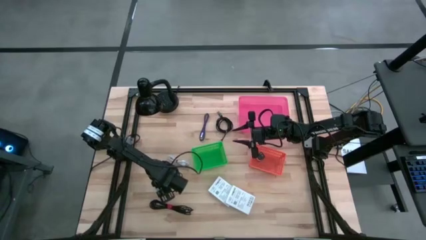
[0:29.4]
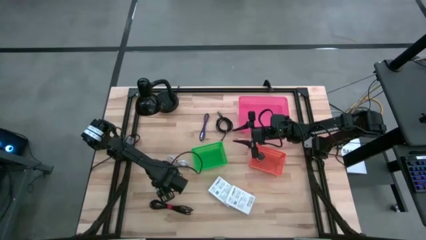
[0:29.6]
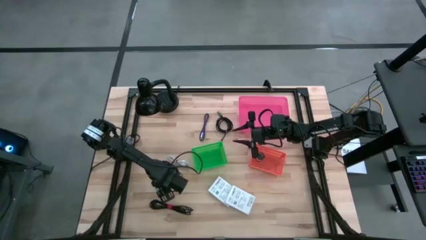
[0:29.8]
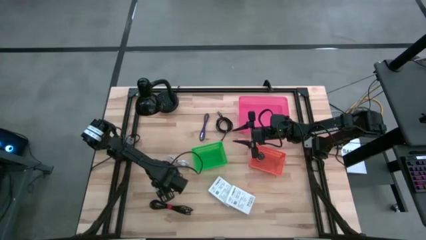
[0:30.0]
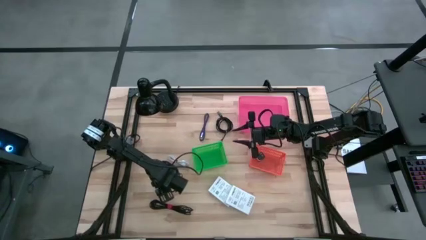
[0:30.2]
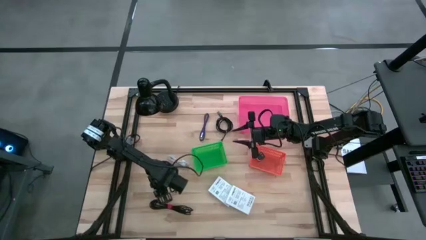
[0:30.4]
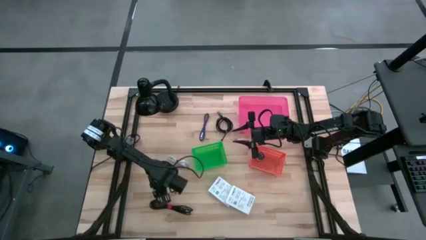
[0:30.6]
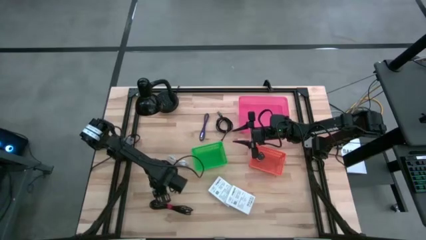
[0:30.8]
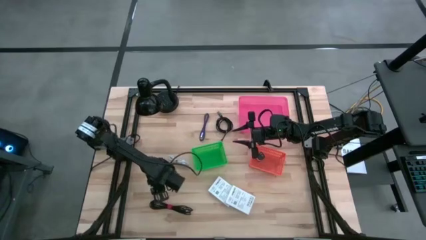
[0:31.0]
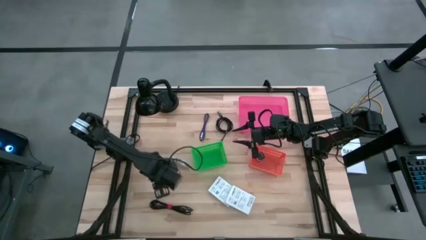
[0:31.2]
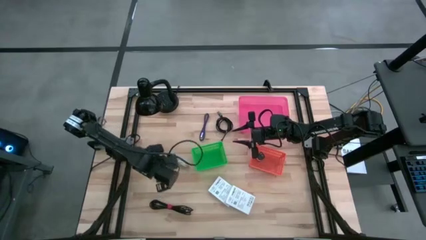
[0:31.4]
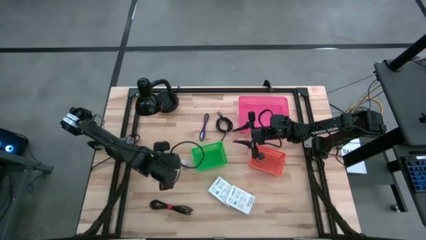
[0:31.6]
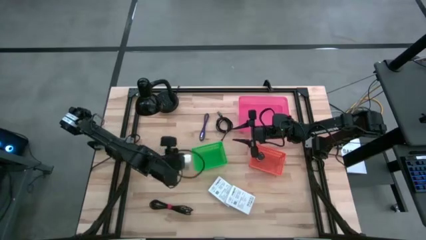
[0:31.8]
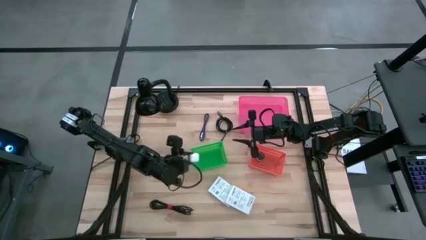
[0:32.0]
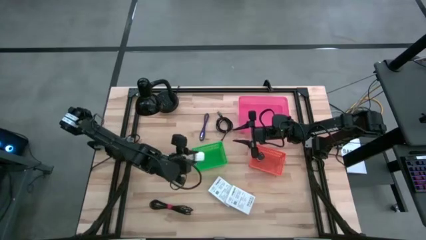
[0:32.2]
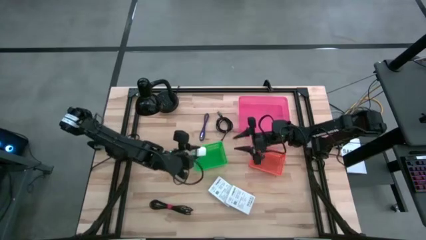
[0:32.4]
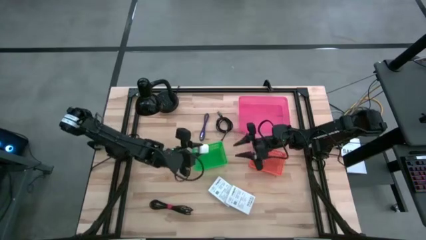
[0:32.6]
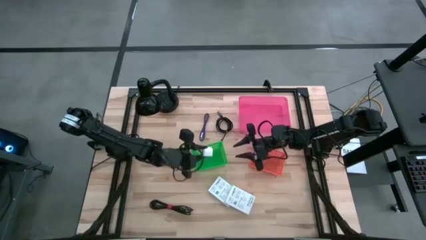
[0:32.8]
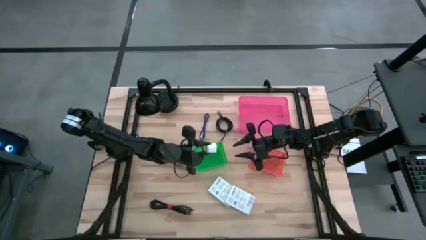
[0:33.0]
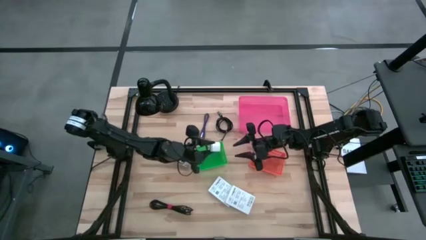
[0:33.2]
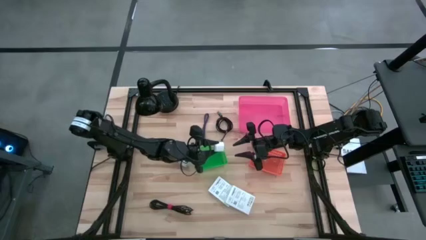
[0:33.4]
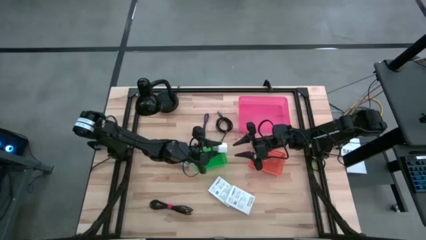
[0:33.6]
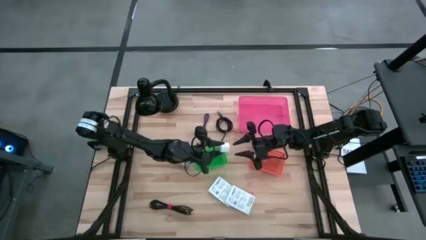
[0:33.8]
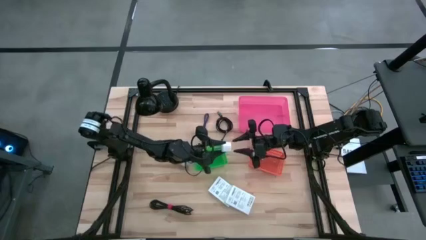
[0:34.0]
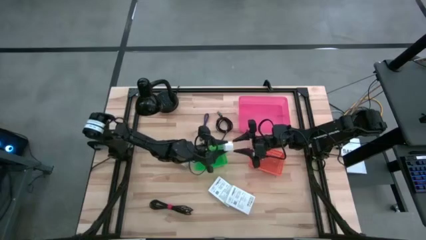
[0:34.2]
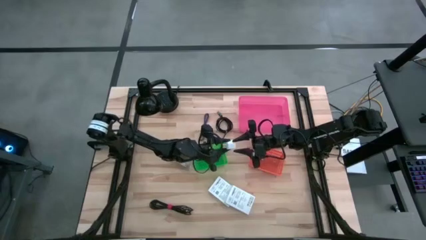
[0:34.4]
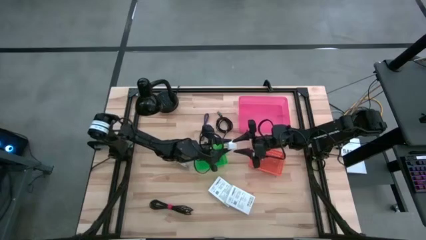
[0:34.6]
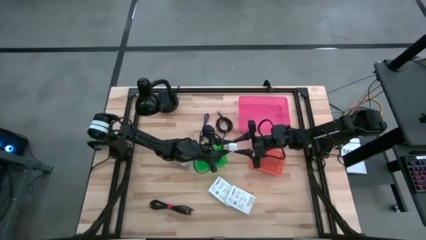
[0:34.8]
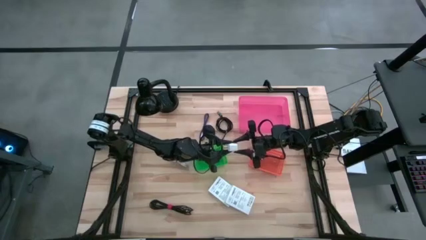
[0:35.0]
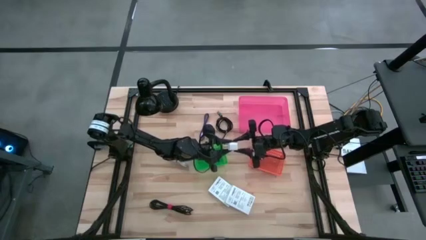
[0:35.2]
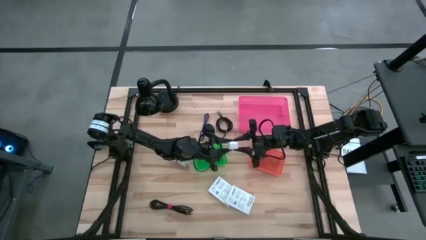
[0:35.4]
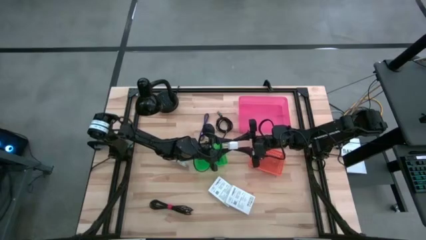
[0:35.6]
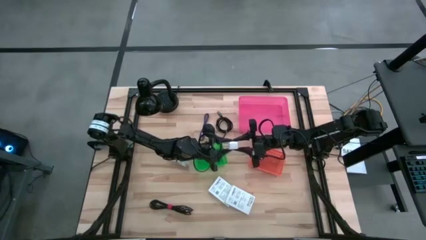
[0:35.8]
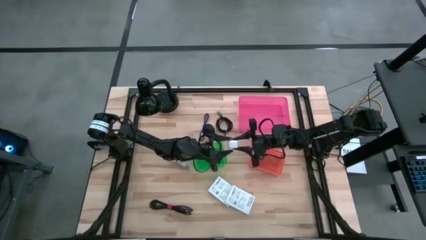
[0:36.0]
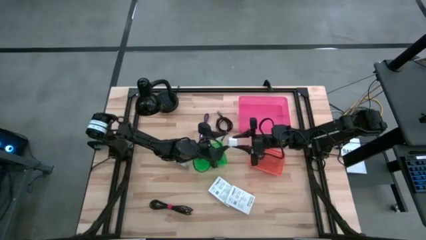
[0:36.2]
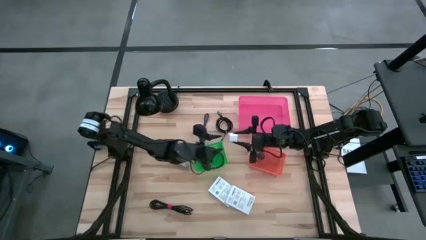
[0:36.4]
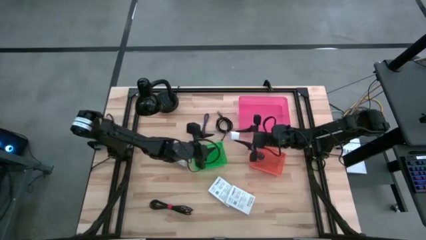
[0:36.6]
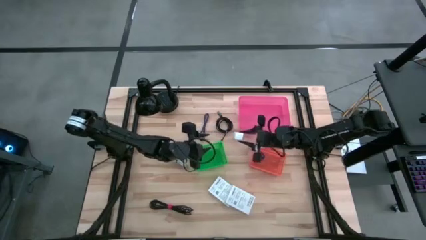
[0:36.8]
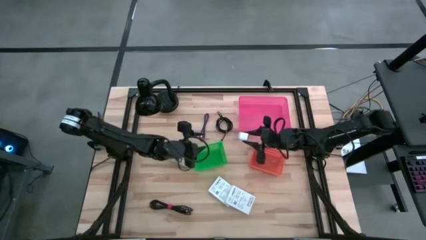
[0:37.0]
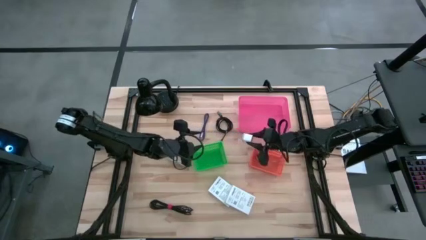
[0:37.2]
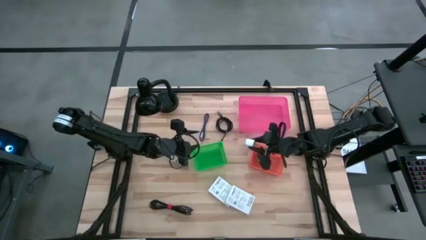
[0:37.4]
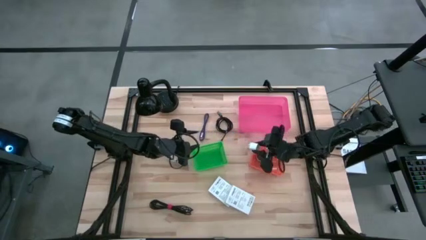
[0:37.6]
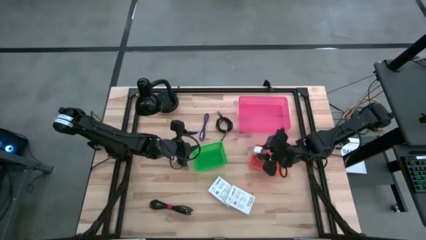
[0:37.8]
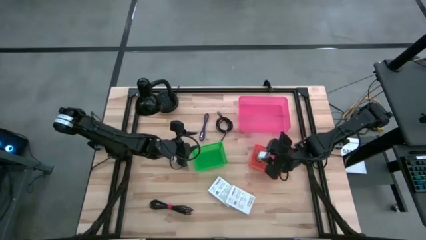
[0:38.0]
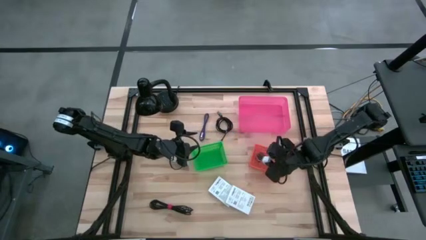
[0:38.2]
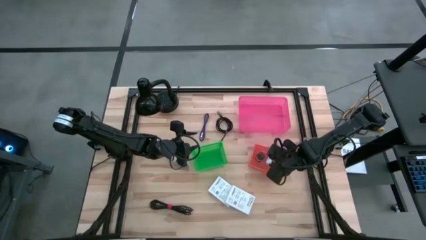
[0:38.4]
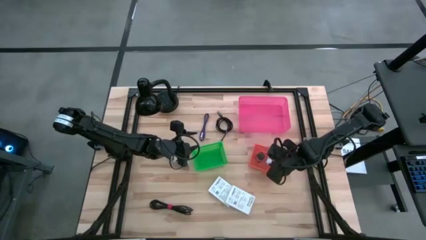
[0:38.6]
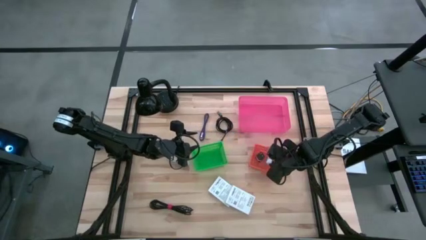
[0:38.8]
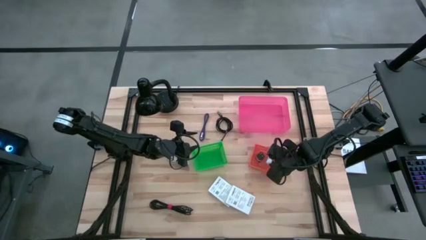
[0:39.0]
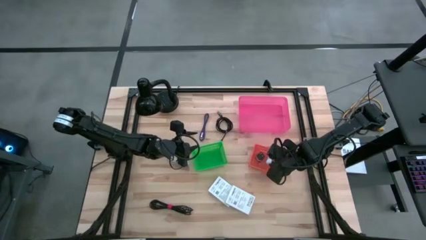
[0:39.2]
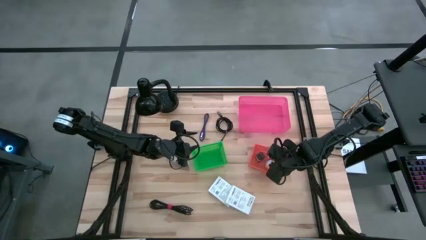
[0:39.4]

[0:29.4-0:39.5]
Task: Pick and place items into bin
Put the white charger adapter into the orange bin

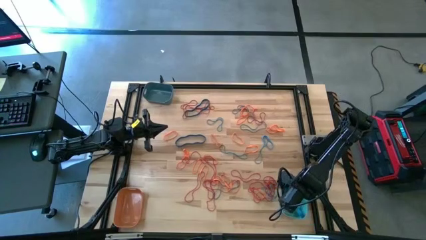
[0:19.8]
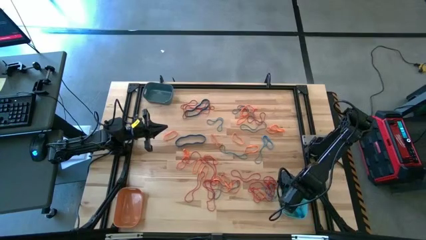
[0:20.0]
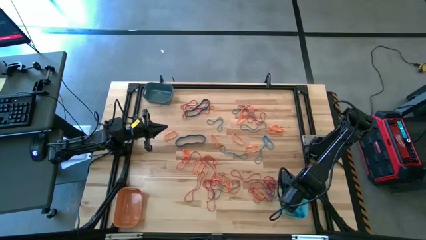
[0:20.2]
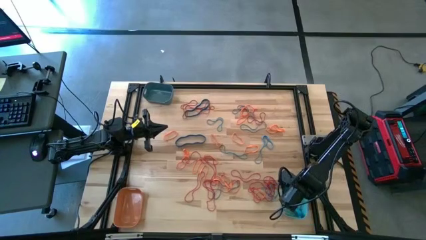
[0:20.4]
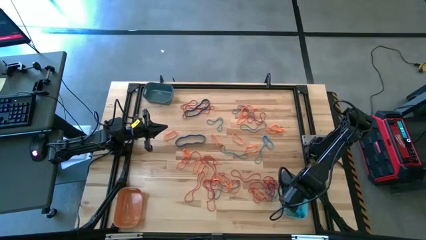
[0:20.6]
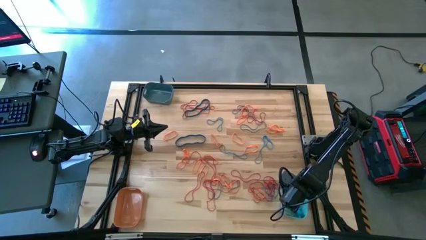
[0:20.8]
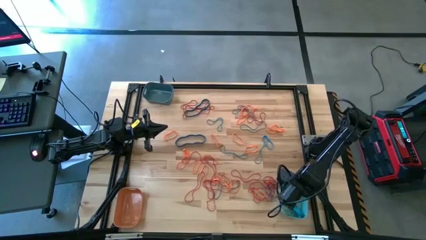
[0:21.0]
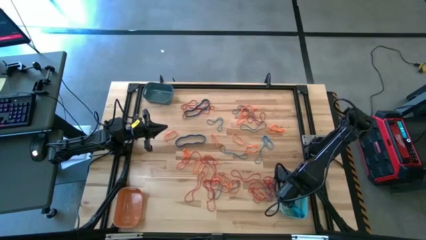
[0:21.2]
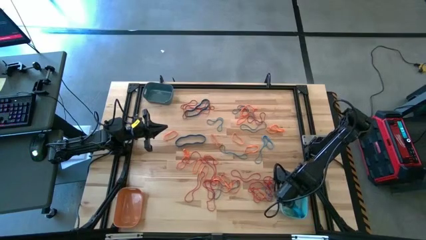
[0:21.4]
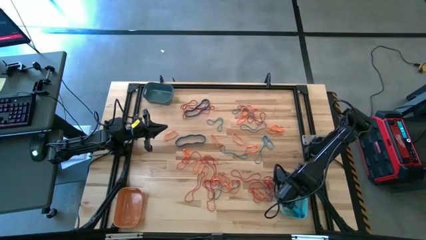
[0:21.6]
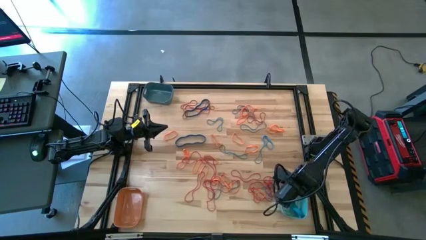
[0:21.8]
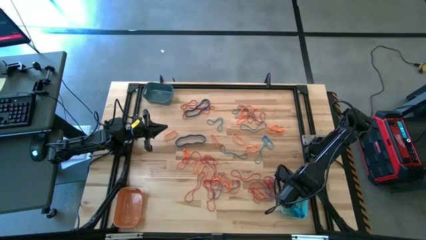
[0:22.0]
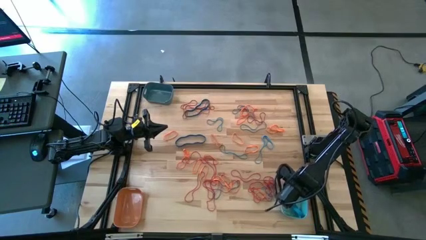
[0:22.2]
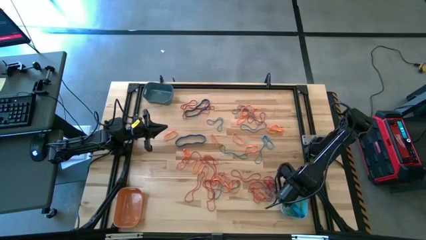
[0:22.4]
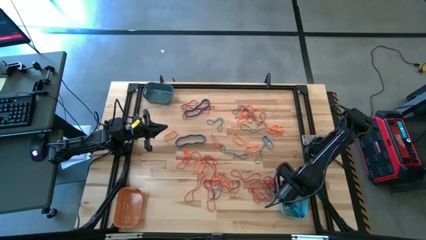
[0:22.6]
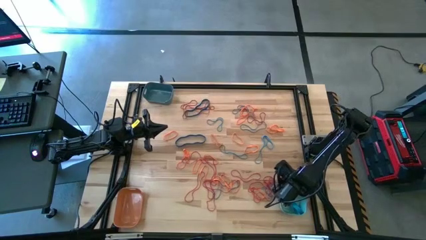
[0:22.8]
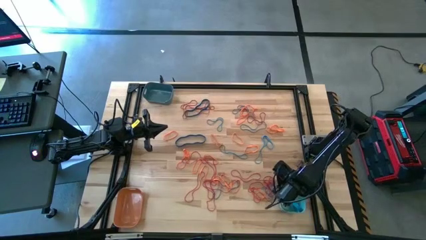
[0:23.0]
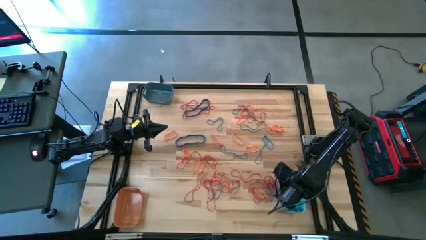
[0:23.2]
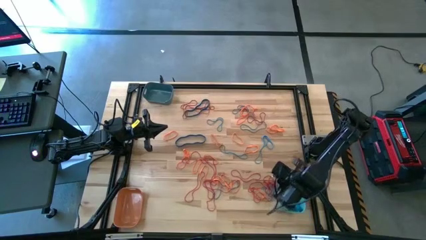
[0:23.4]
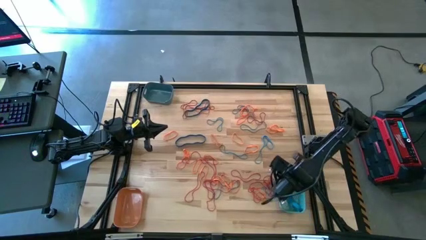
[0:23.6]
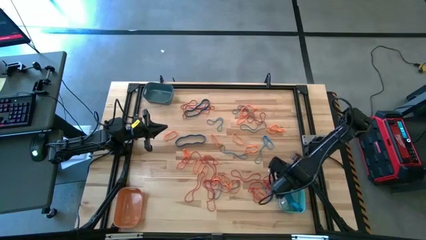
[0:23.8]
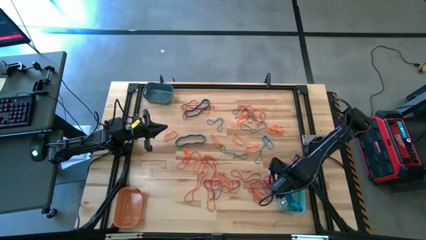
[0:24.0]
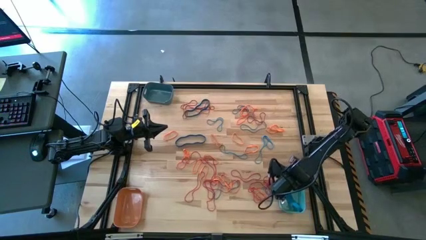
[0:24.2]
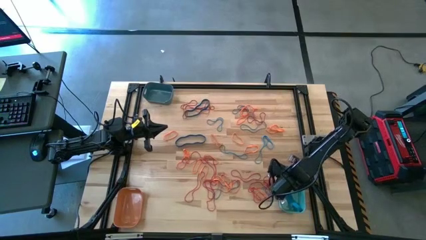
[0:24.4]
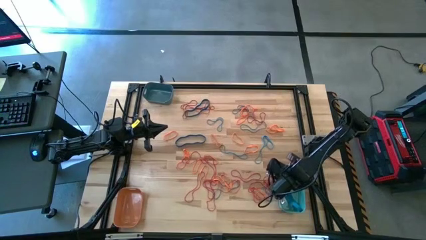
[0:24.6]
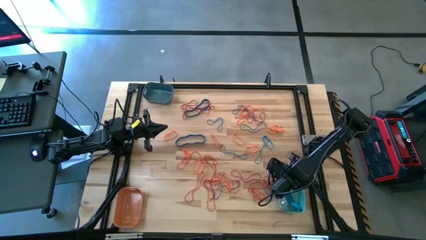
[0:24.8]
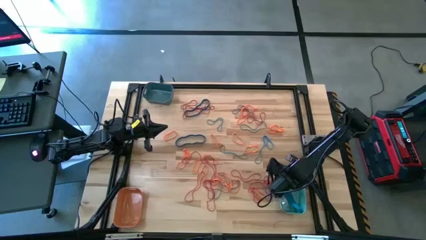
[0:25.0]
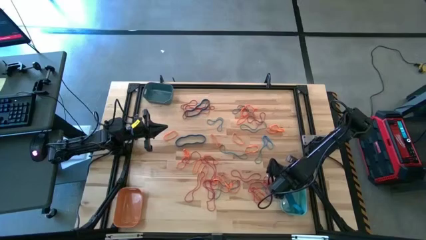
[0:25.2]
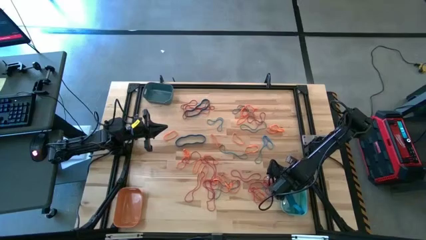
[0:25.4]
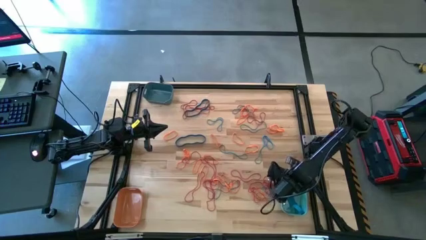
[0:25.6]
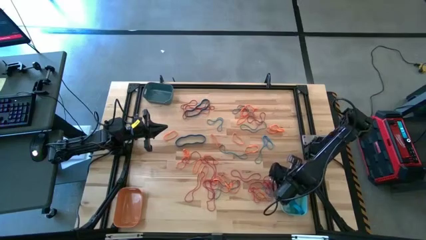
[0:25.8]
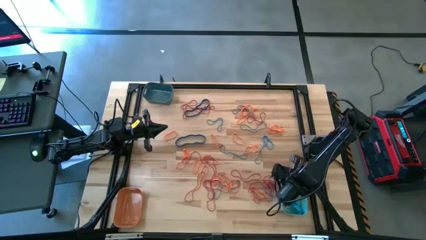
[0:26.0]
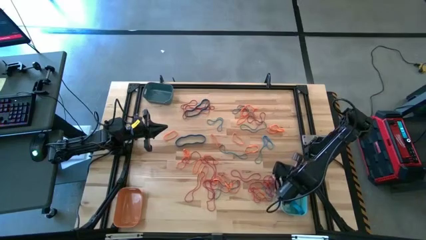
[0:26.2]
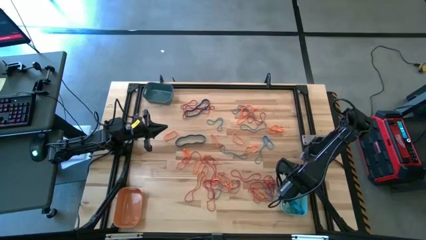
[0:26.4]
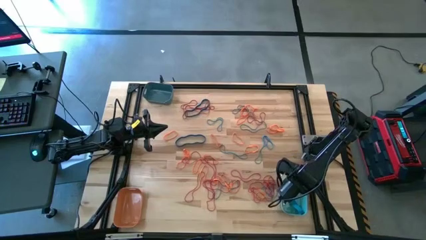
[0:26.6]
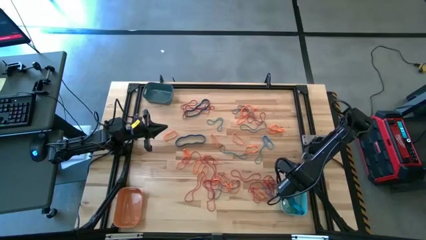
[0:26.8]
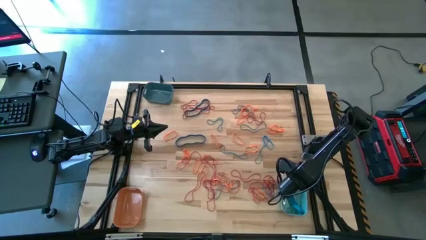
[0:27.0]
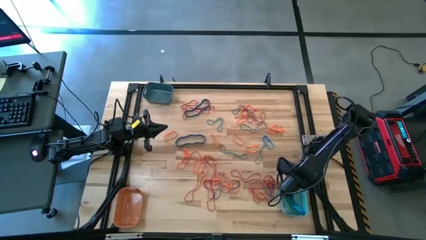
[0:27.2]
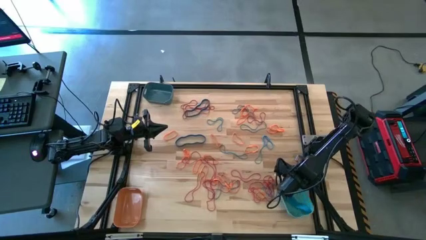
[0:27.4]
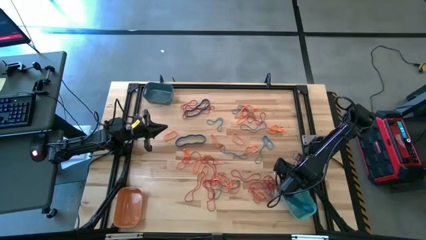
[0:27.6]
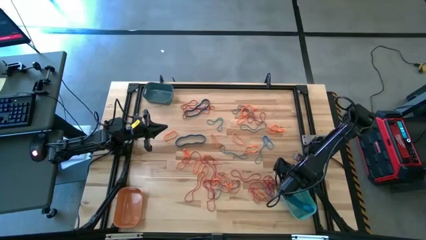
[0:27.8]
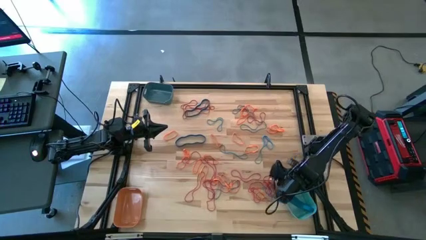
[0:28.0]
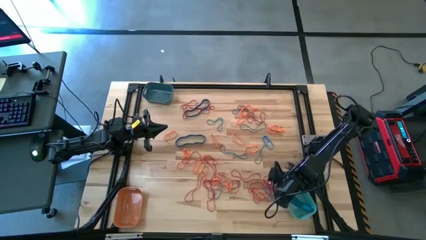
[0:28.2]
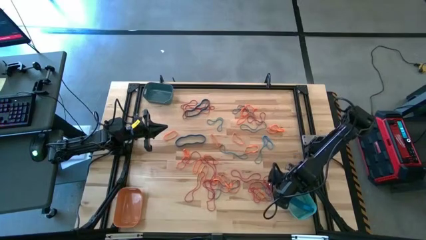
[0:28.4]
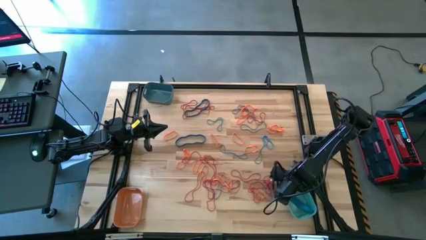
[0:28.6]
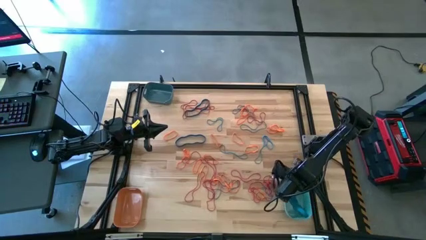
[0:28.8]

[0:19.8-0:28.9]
Task: Sort rubber bands into baskets
Adjust the light blue bin
